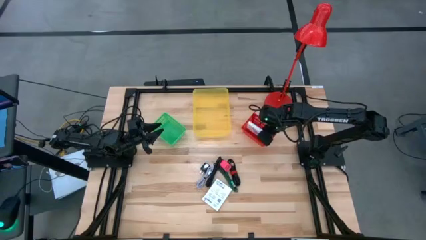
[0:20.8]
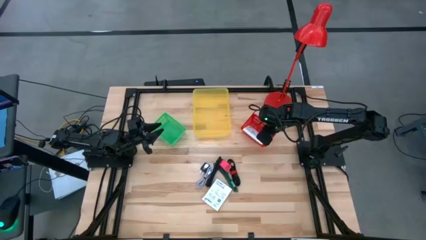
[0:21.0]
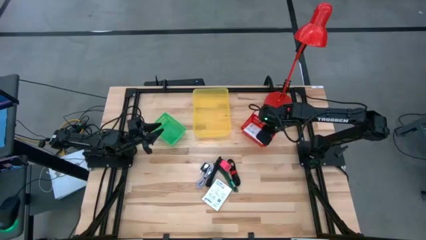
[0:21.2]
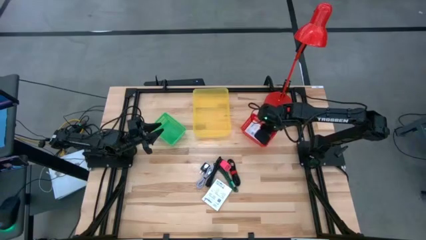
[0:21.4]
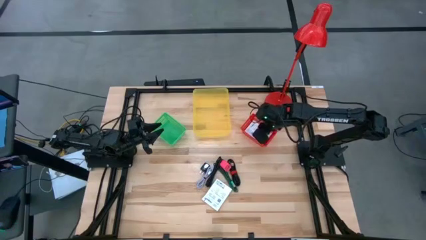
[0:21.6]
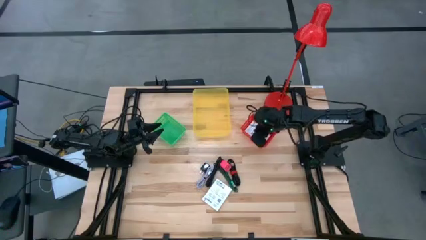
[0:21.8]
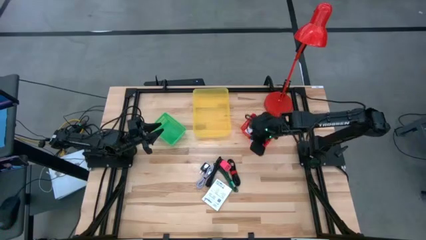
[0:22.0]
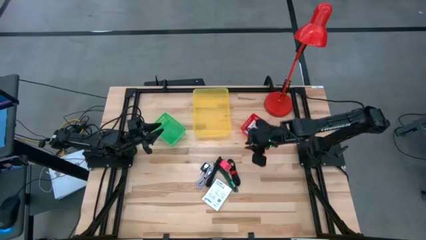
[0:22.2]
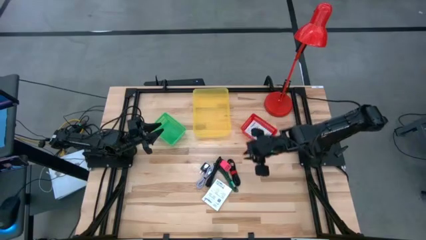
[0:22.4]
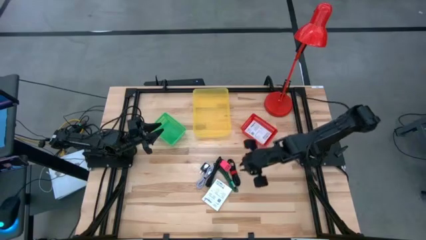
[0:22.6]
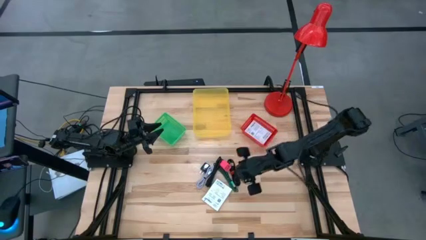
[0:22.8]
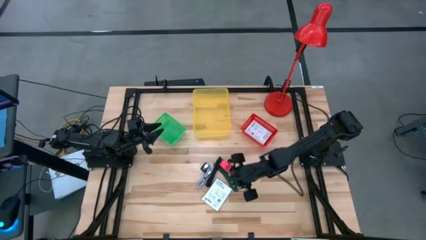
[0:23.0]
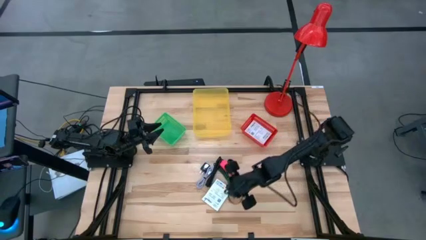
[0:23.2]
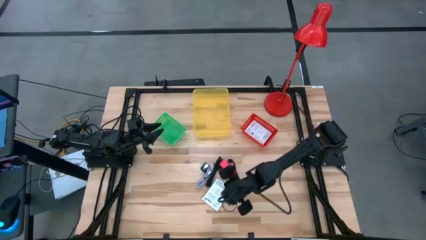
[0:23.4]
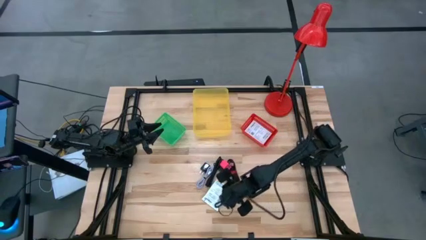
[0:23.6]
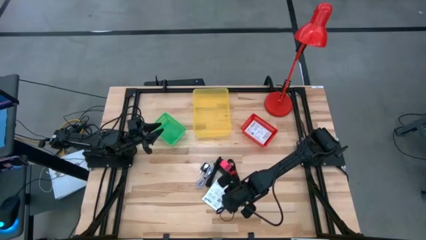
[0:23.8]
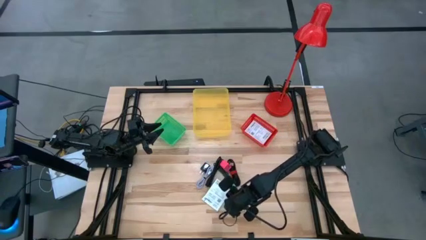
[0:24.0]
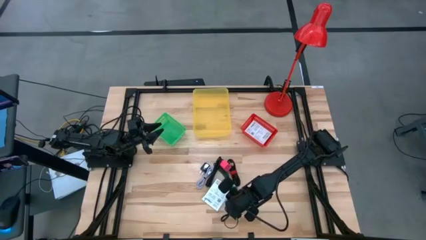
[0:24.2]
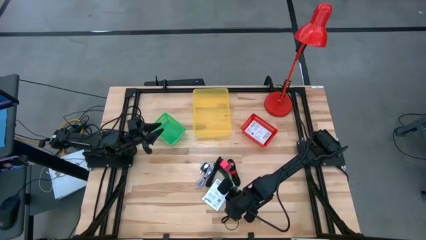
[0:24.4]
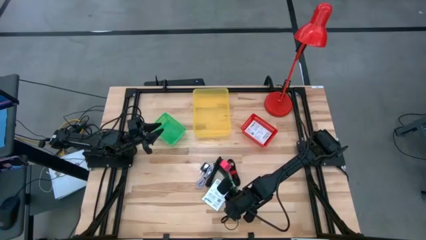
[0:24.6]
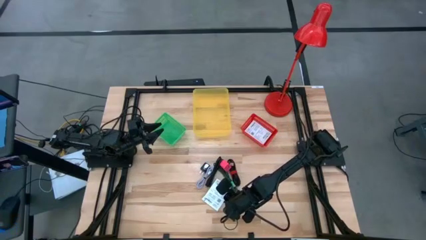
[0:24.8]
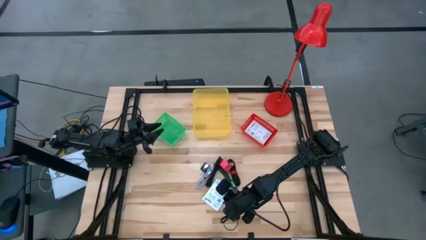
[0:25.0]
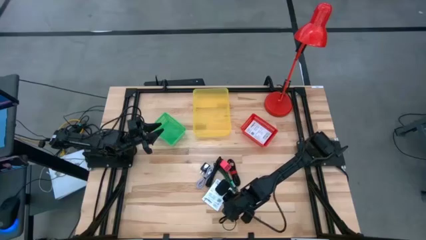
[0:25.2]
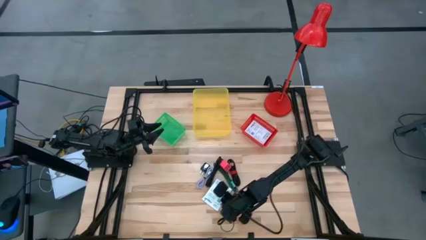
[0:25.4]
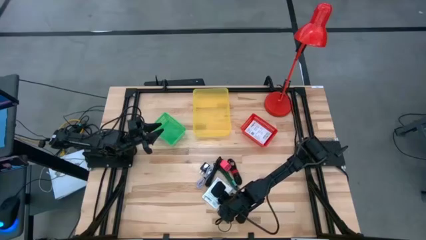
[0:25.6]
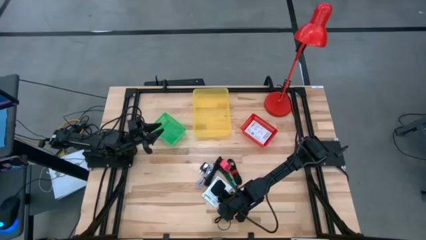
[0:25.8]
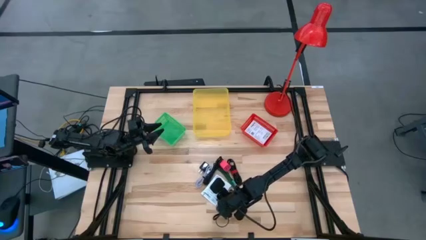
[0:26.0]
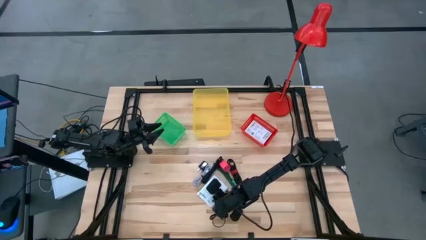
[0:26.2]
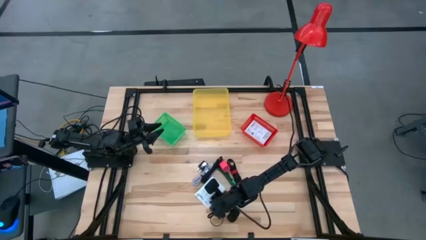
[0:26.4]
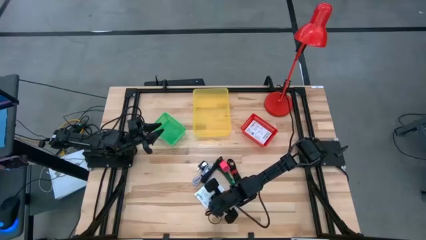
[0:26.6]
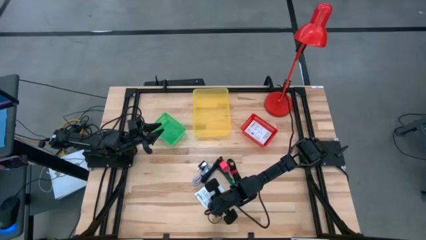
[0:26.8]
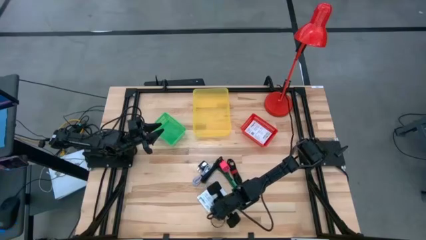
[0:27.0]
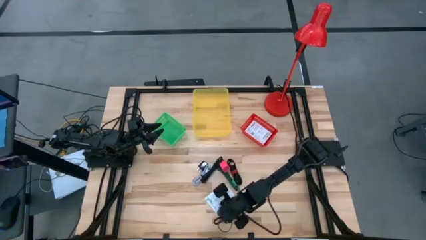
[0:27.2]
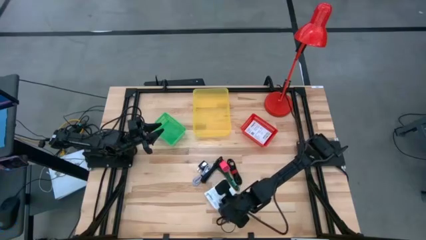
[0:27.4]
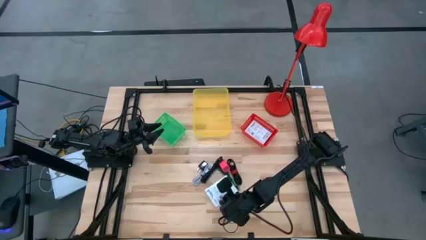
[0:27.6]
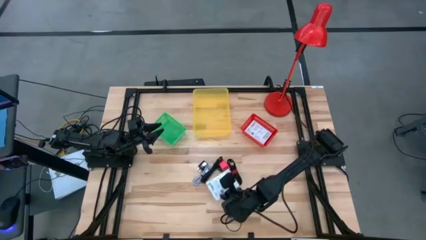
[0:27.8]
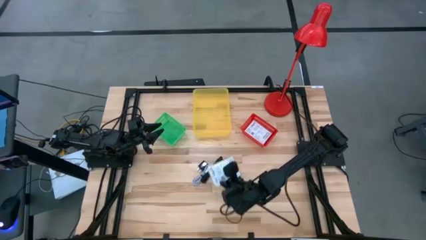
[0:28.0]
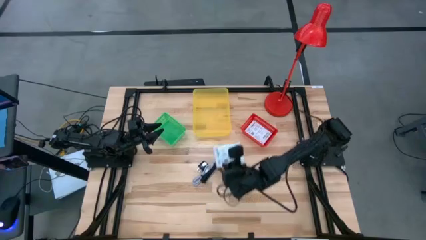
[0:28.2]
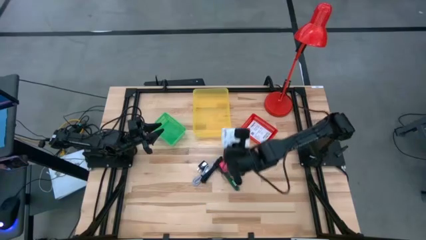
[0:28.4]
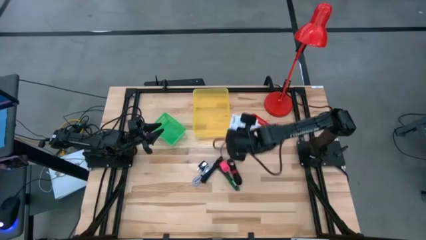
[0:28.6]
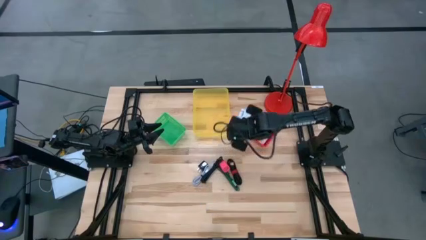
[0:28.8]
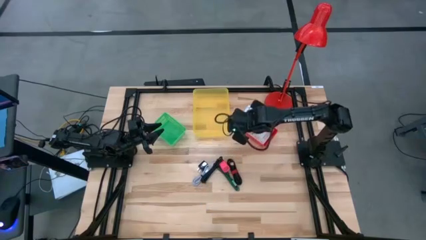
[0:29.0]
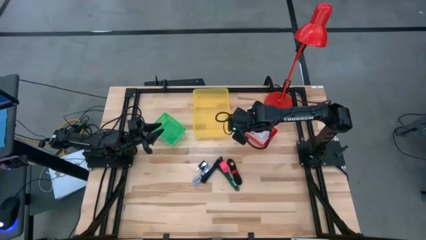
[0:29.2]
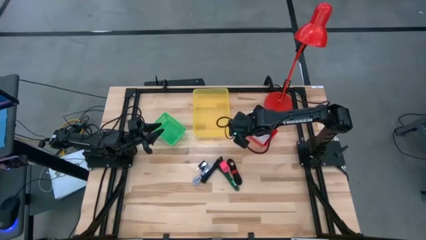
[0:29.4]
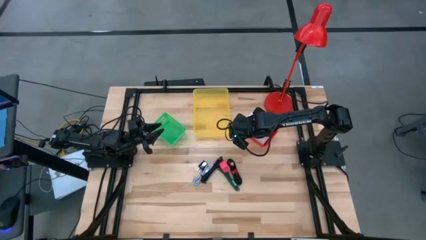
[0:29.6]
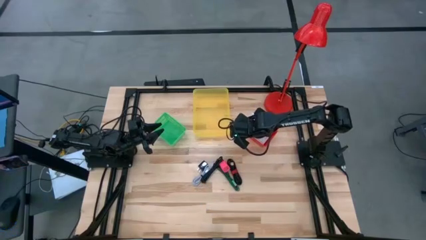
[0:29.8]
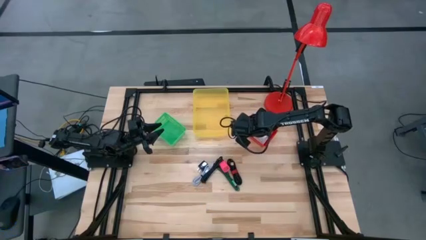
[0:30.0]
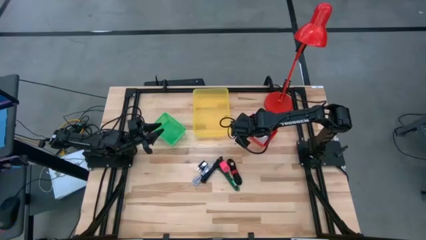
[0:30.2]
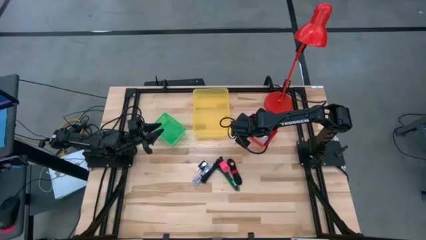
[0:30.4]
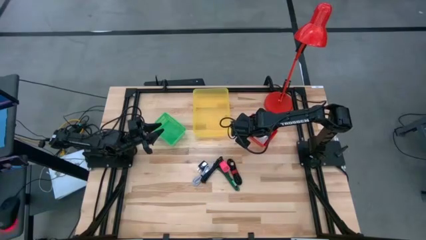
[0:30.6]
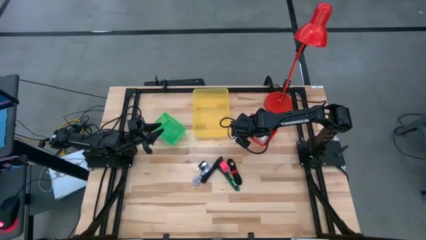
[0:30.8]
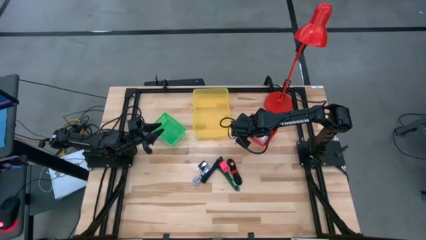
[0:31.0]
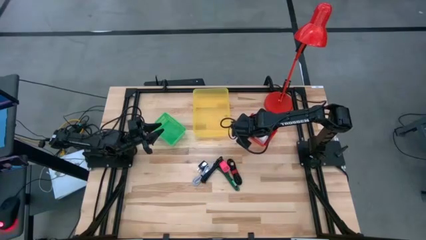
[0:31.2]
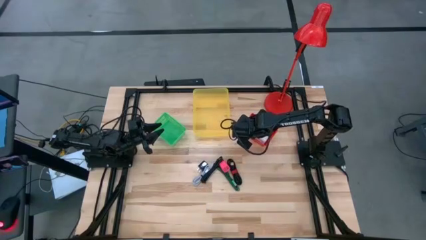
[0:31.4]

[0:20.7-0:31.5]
Task: Pick and place items into bin
Put the white card reader box into the red bin

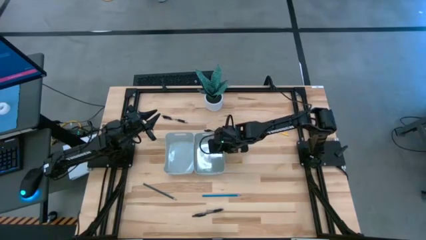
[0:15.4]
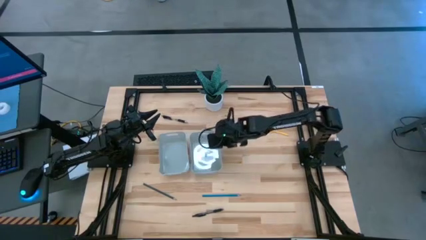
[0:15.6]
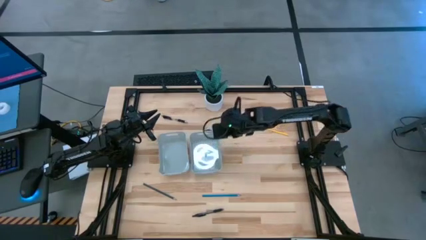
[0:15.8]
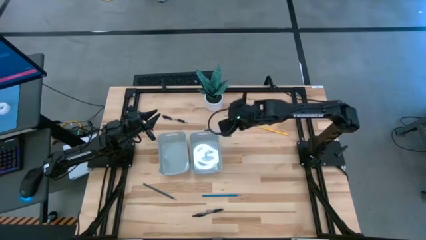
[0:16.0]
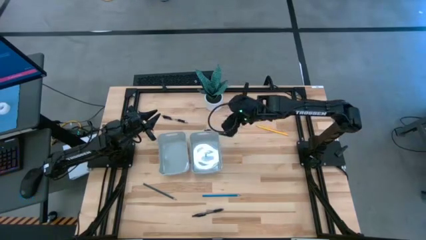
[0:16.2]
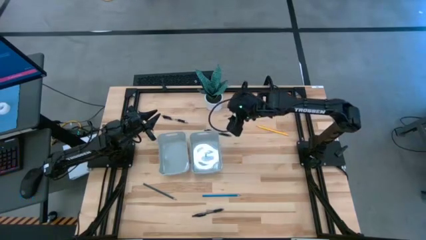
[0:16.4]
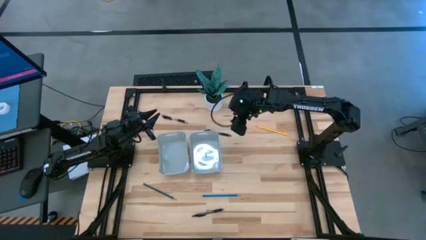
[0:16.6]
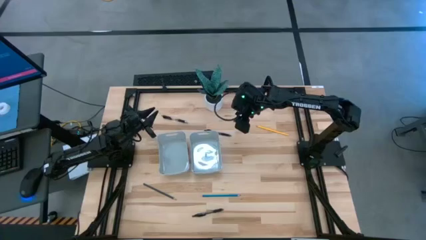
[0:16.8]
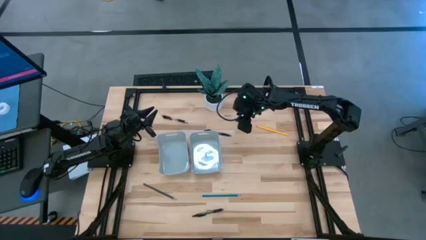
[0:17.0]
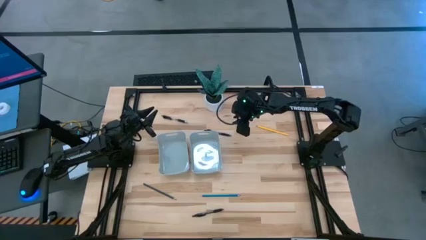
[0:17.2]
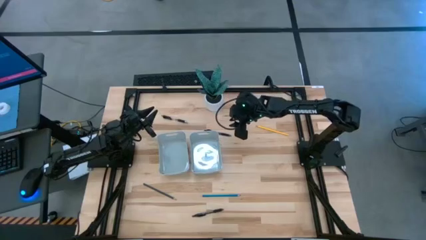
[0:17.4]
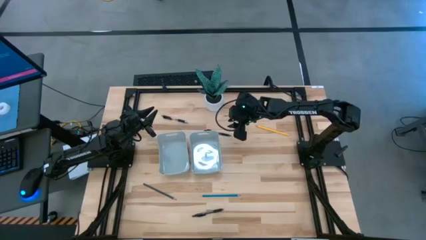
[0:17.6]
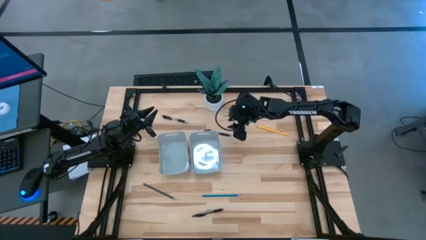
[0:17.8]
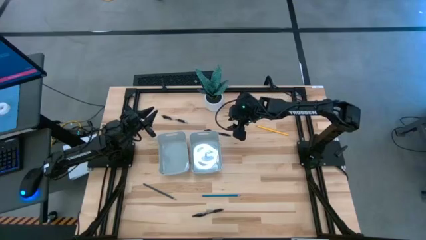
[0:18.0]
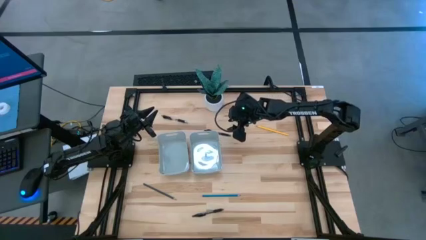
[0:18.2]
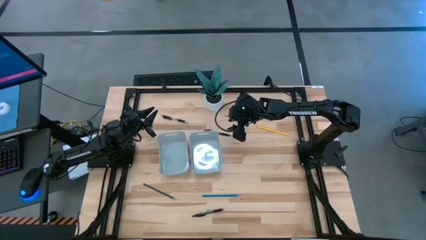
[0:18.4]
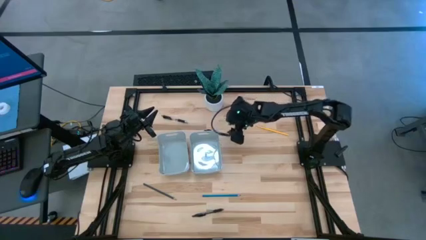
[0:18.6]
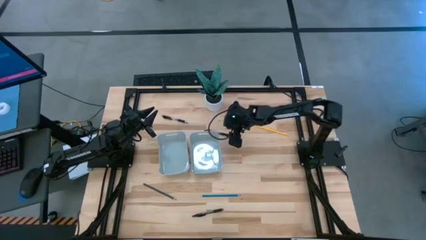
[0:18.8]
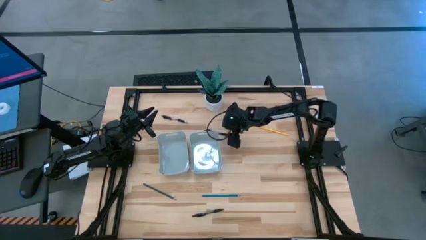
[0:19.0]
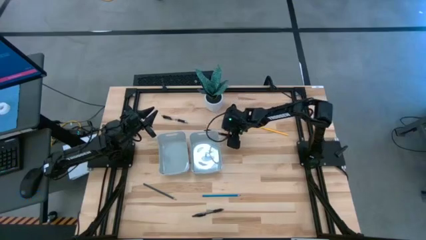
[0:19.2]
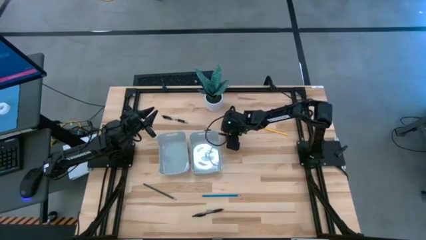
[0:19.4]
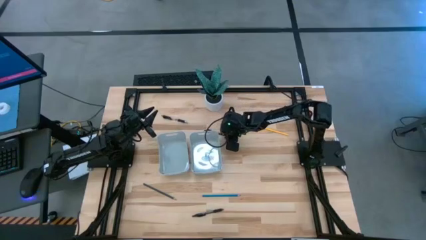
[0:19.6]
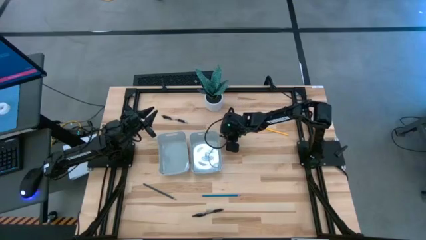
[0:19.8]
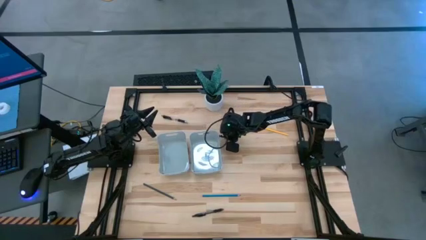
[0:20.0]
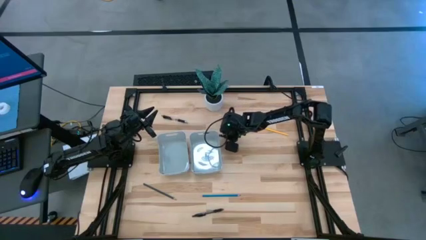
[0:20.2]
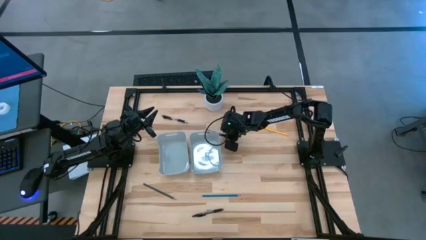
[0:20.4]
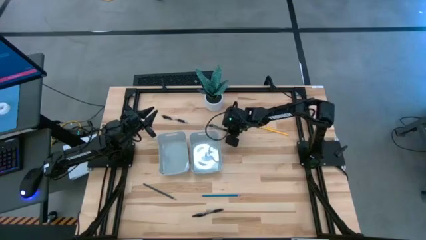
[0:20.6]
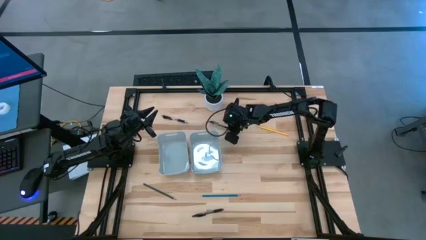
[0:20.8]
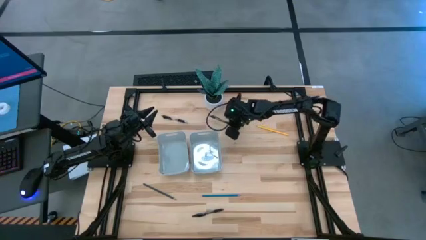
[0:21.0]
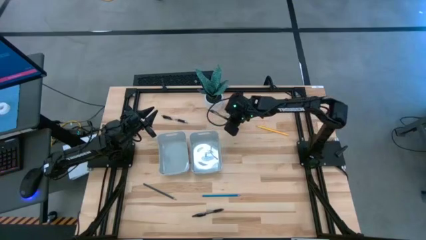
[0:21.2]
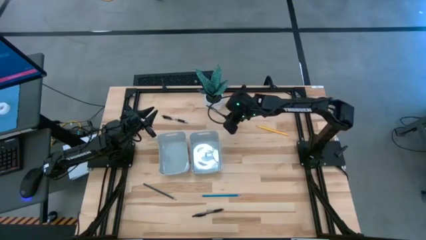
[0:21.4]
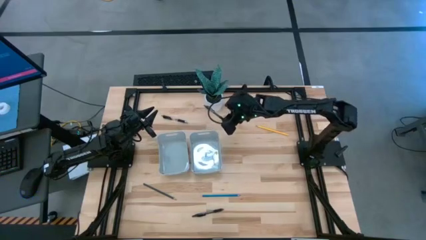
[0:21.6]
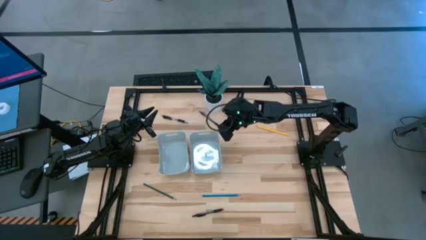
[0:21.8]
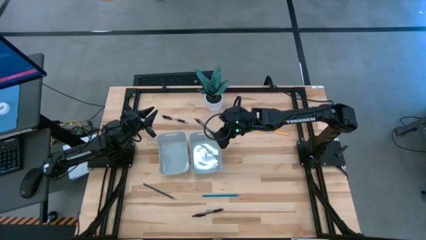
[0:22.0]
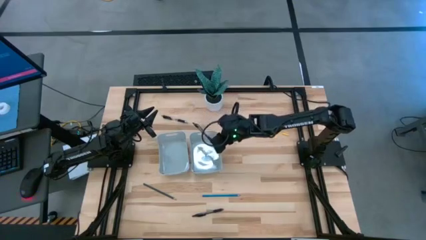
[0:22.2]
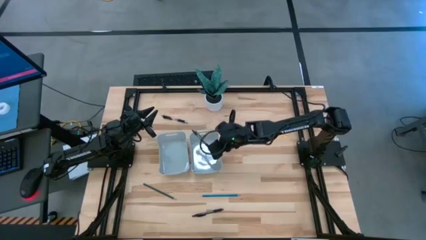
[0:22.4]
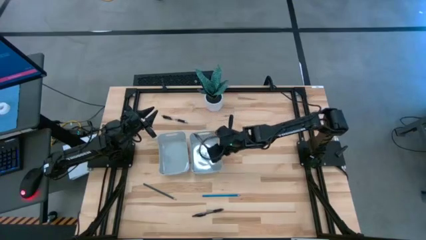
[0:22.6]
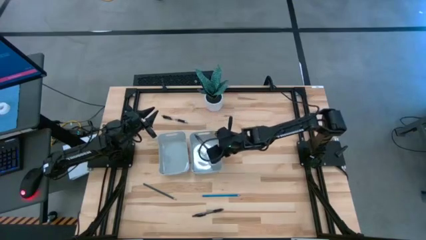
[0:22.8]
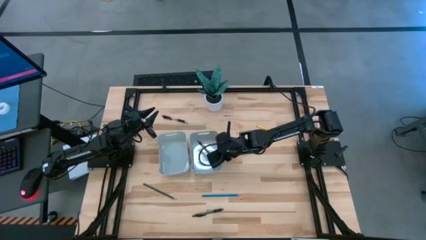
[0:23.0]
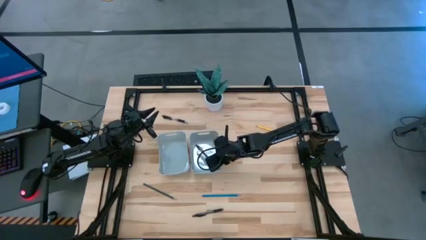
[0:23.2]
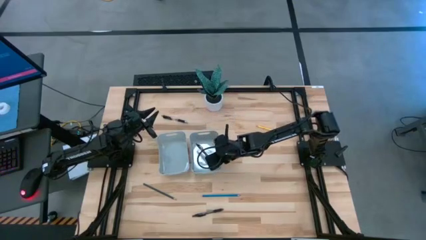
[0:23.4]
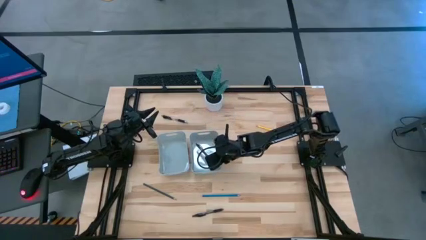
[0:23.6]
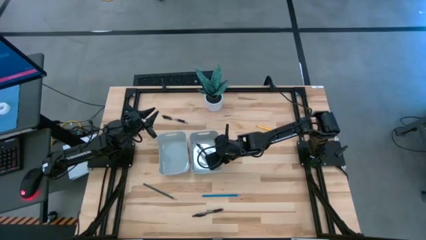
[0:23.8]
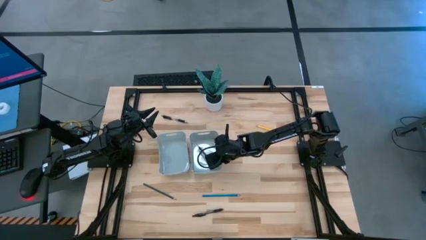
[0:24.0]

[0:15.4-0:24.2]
Task: Sort pens & pencils
Put the top right black pen into the right gray bin
